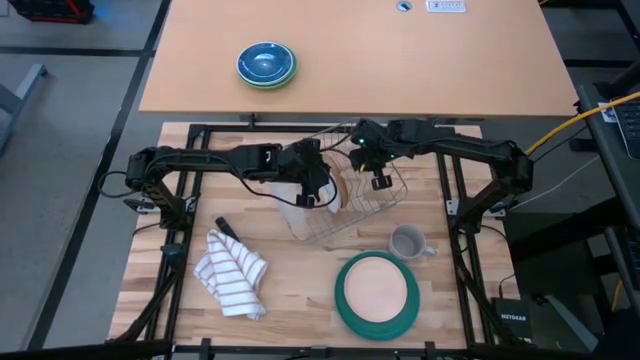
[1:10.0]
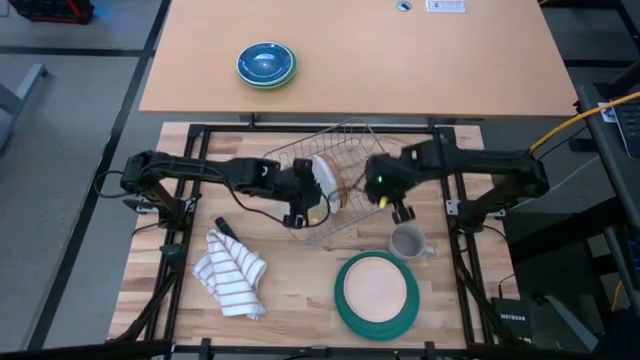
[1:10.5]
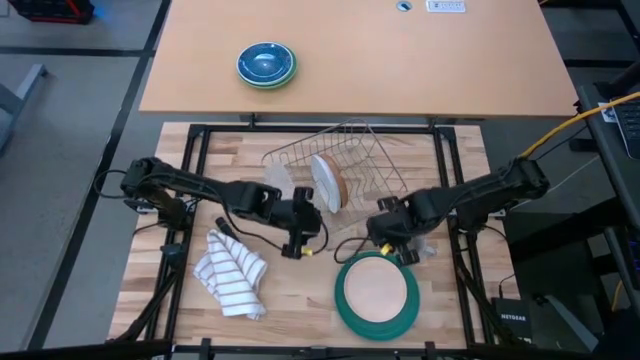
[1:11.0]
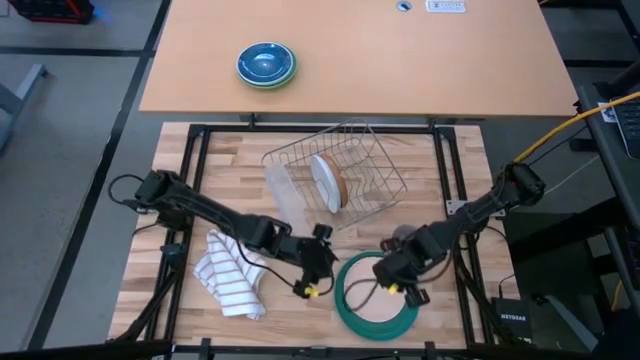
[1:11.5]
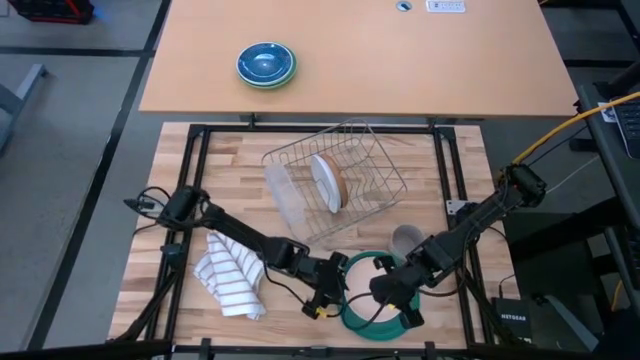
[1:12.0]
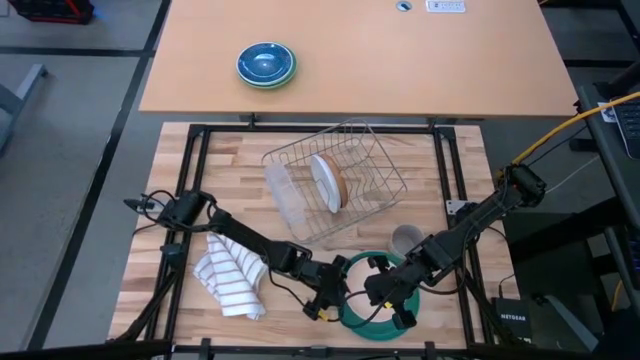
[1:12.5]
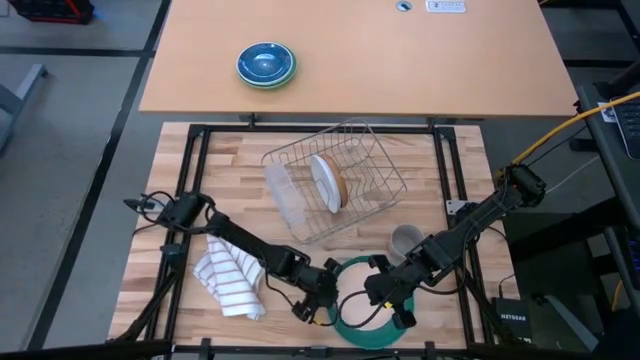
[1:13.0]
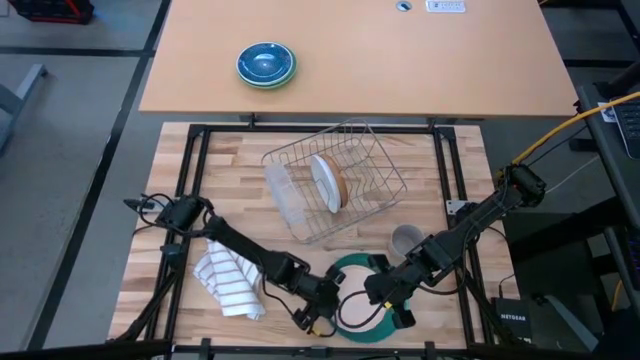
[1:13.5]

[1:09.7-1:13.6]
Task: Sort dishes
Adjust the stack of plates

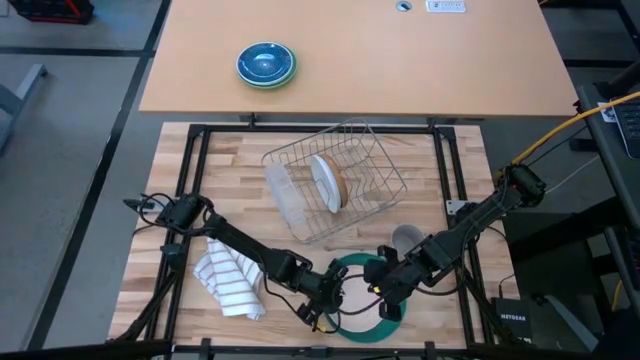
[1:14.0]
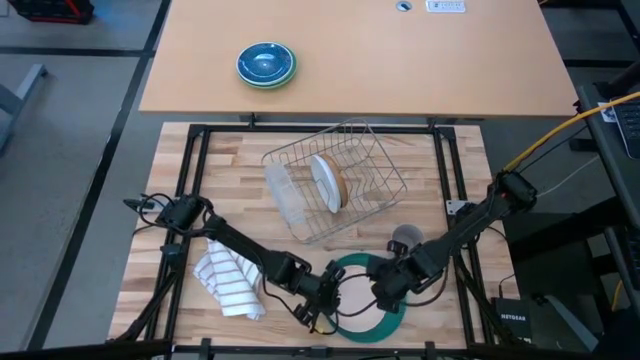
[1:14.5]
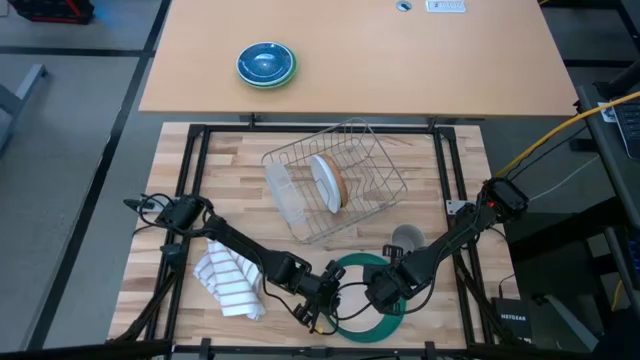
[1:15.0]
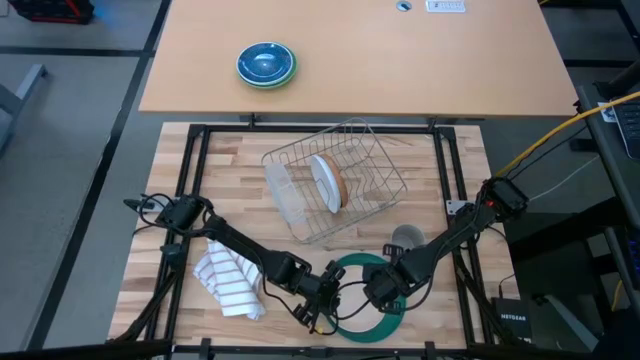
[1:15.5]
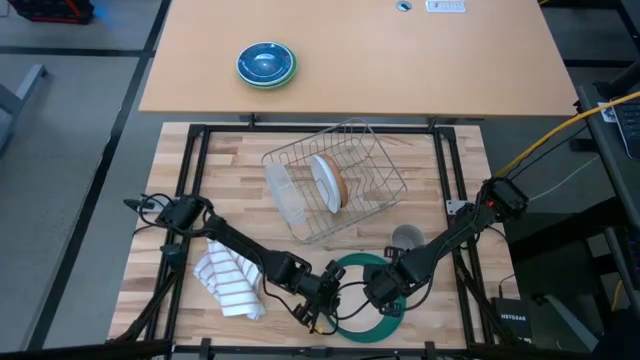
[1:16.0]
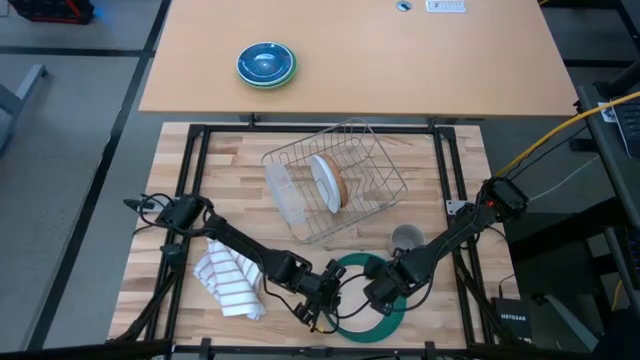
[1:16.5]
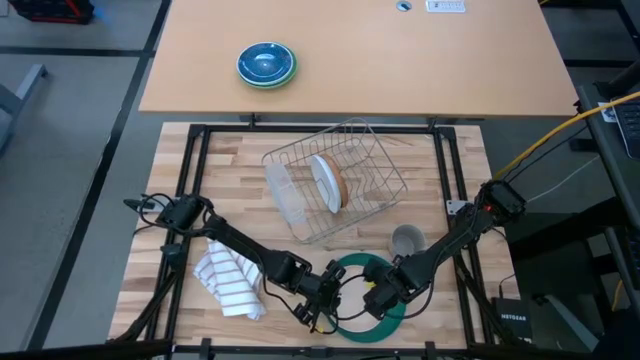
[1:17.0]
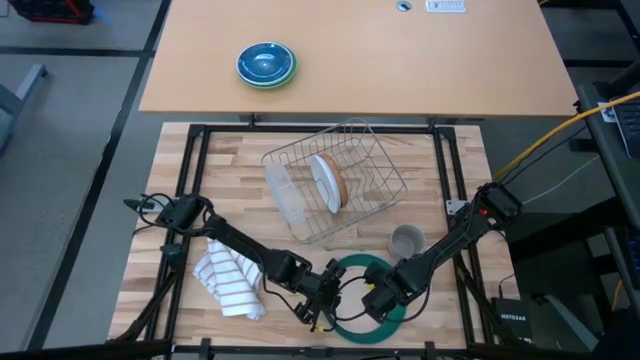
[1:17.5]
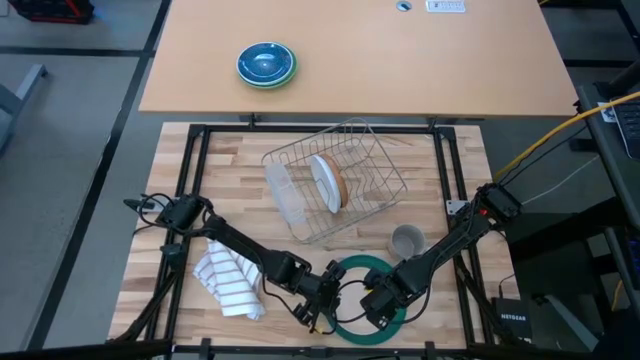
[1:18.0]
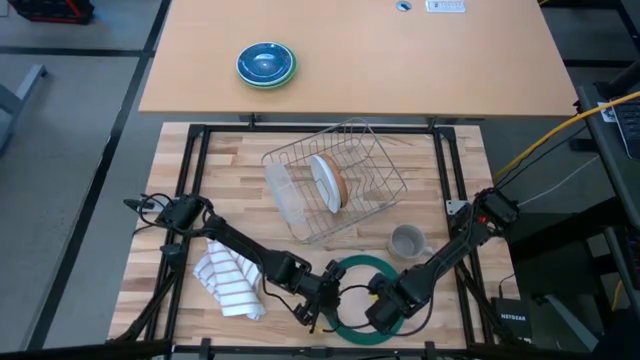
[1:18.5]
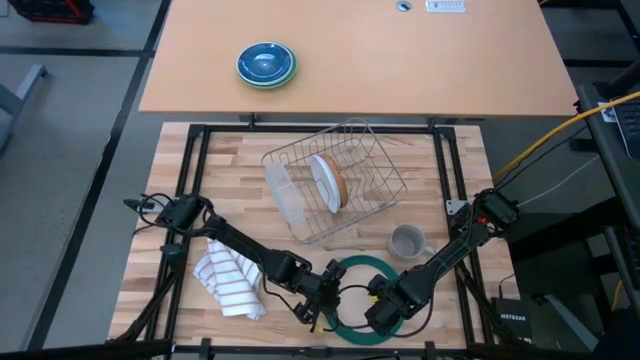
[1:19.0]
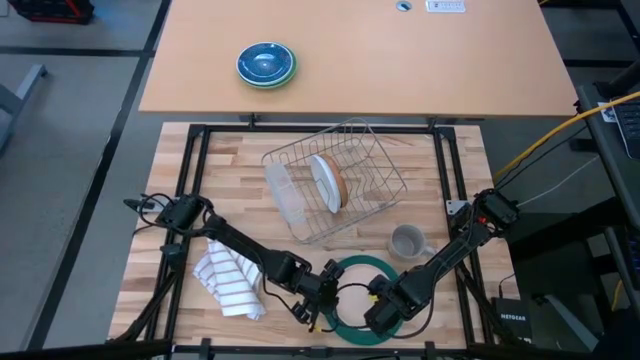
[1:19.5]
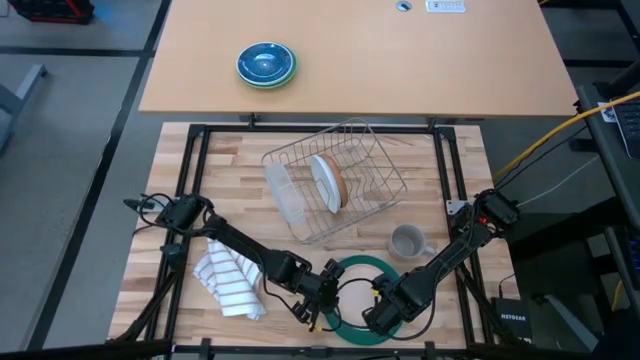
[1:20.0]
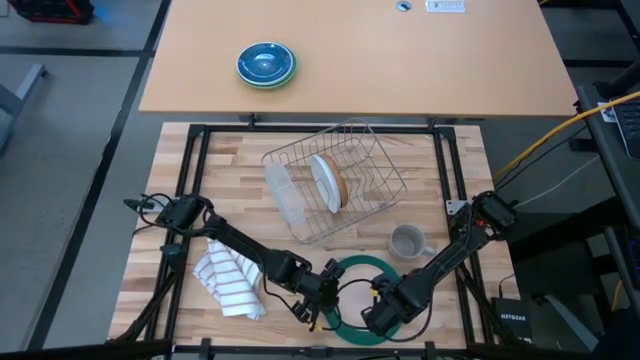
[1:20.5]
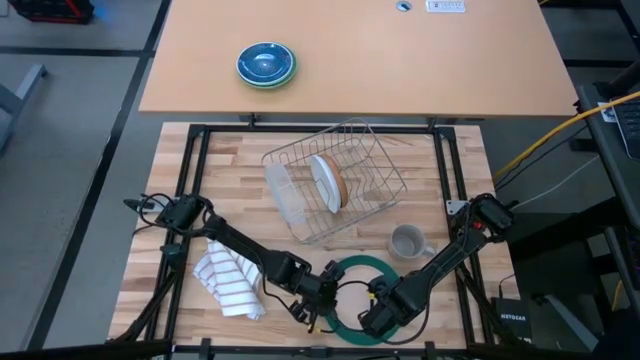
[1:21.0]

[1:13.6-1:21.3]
Put the pink plate in the dish rack

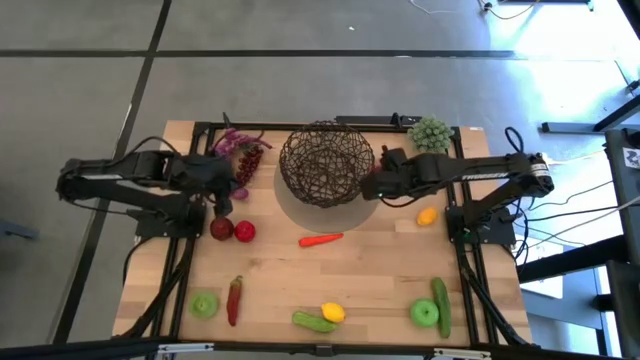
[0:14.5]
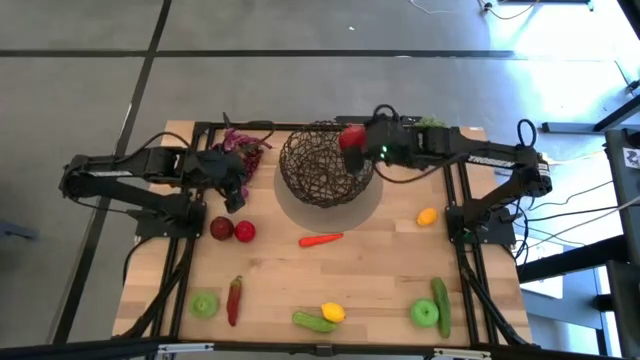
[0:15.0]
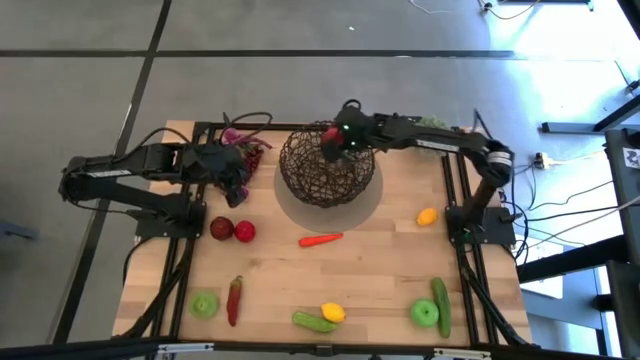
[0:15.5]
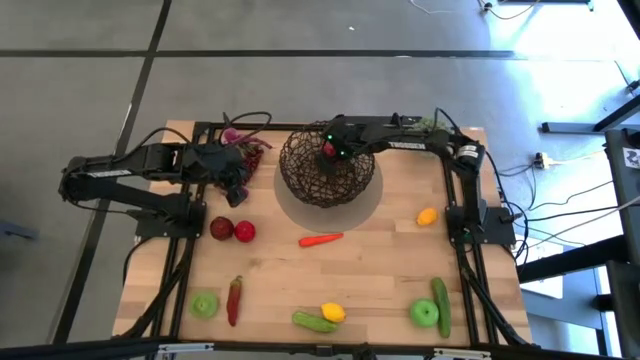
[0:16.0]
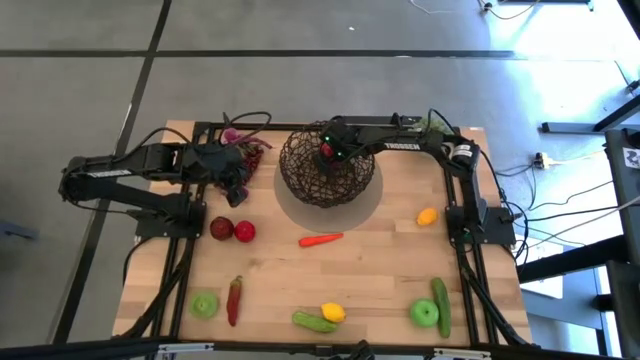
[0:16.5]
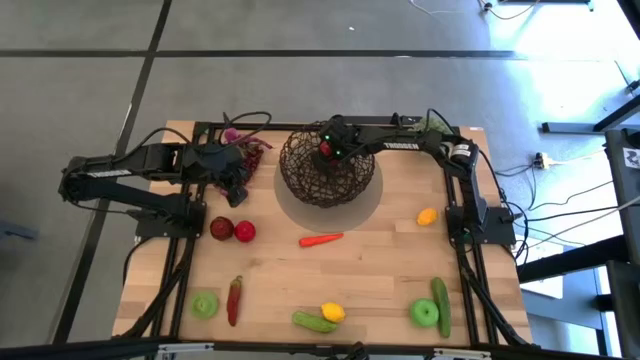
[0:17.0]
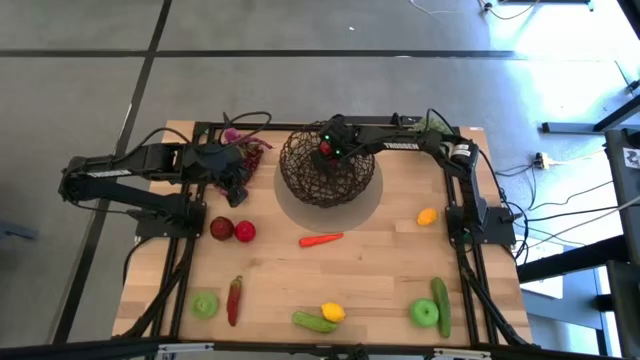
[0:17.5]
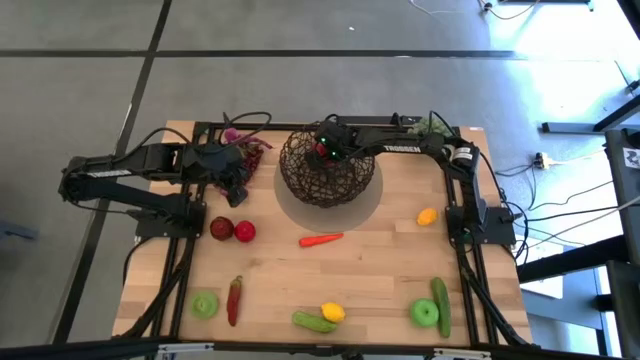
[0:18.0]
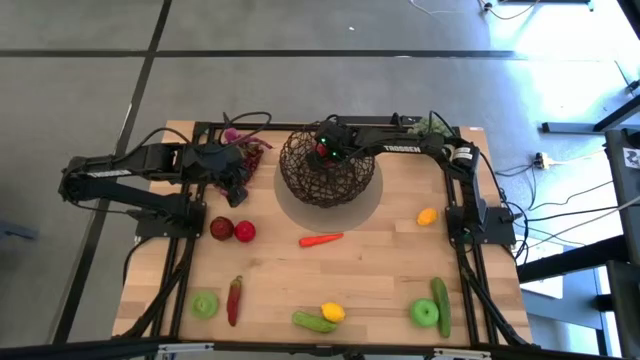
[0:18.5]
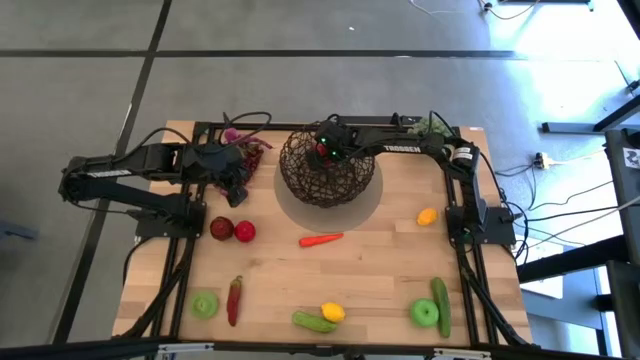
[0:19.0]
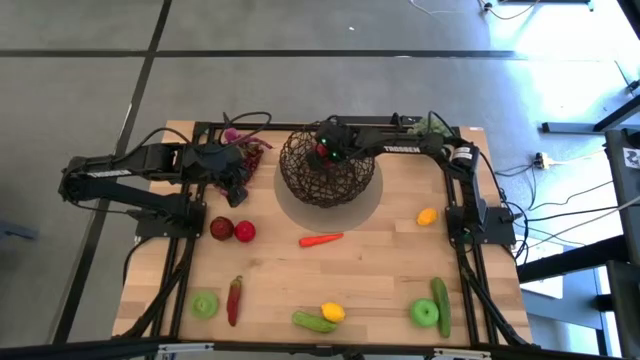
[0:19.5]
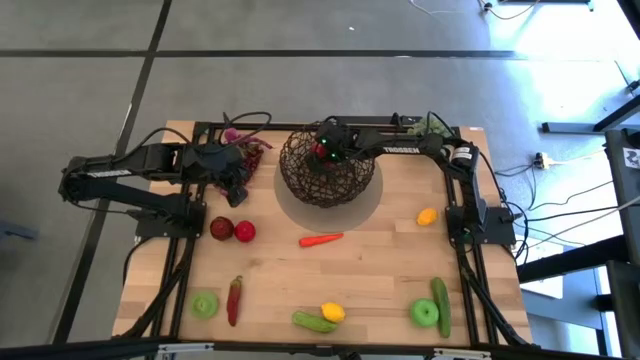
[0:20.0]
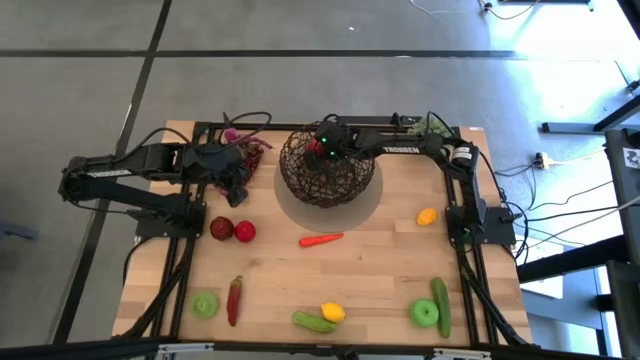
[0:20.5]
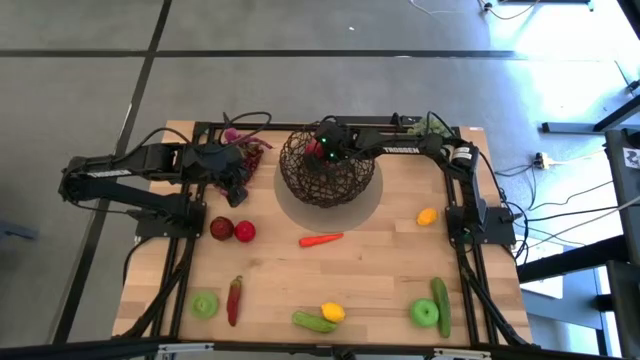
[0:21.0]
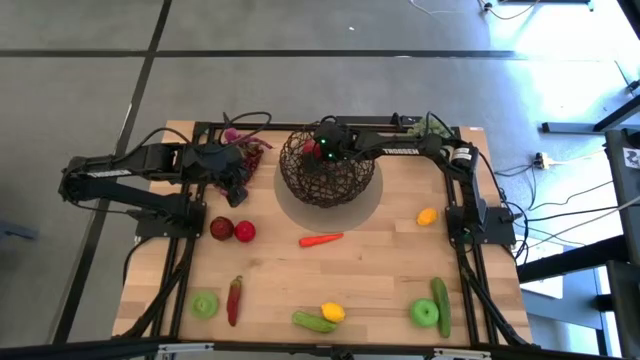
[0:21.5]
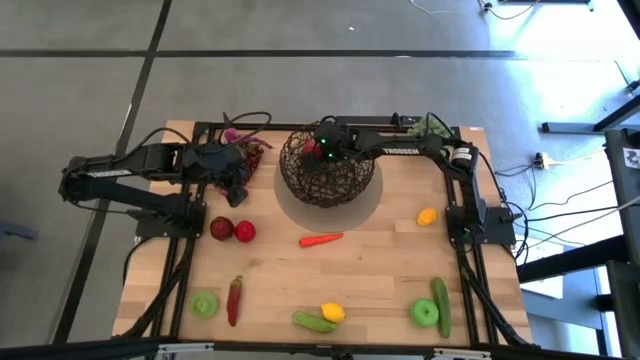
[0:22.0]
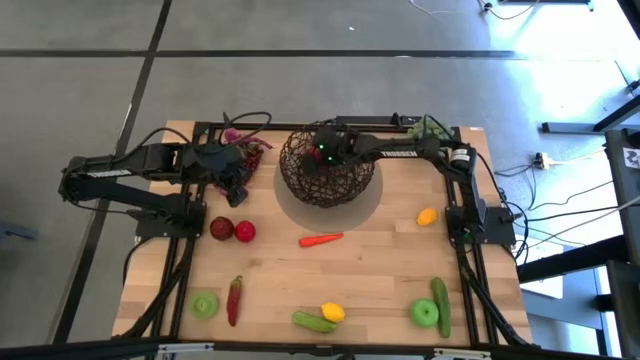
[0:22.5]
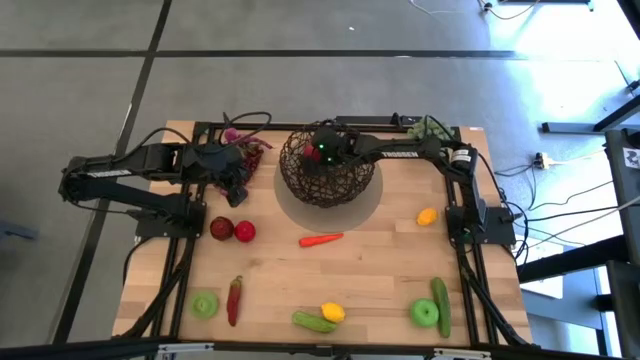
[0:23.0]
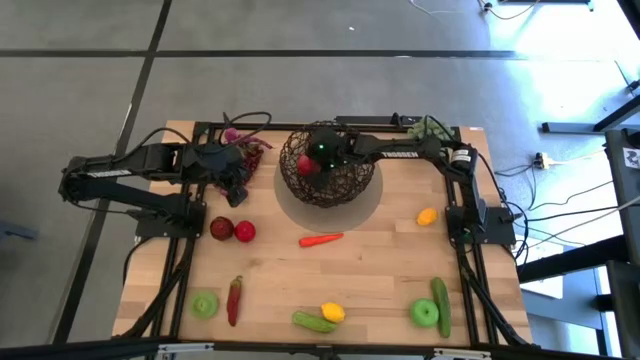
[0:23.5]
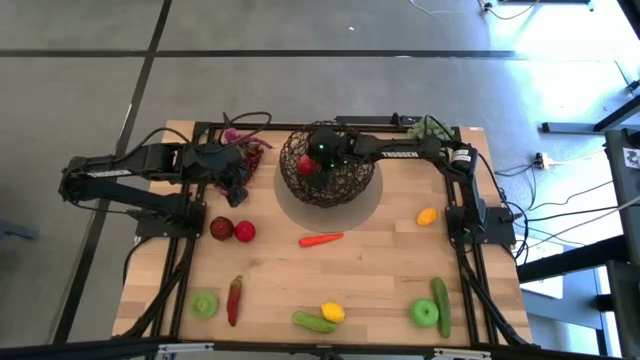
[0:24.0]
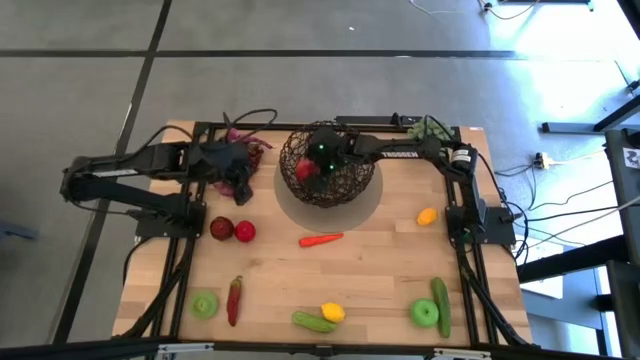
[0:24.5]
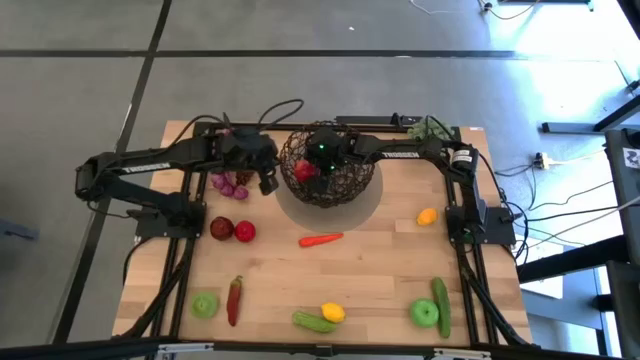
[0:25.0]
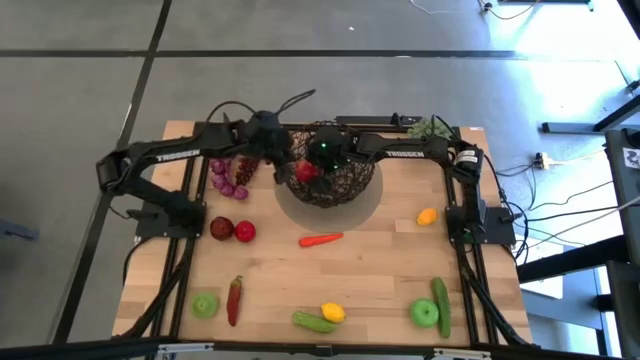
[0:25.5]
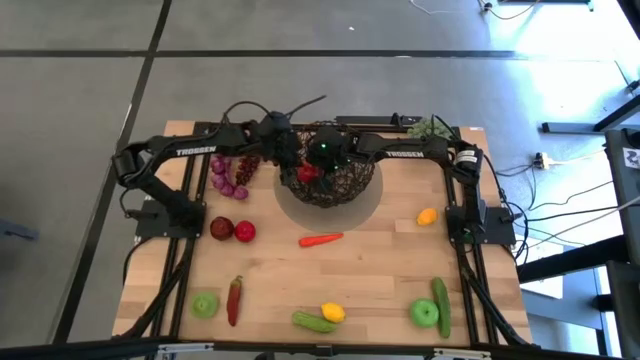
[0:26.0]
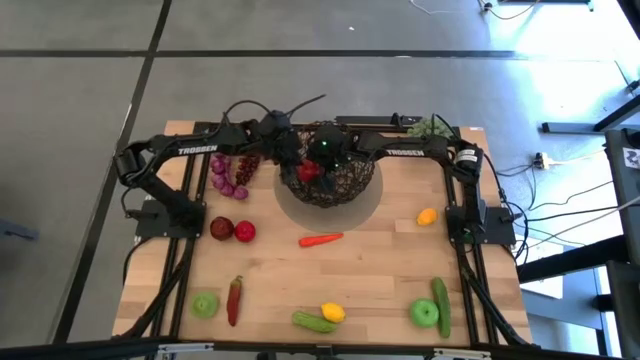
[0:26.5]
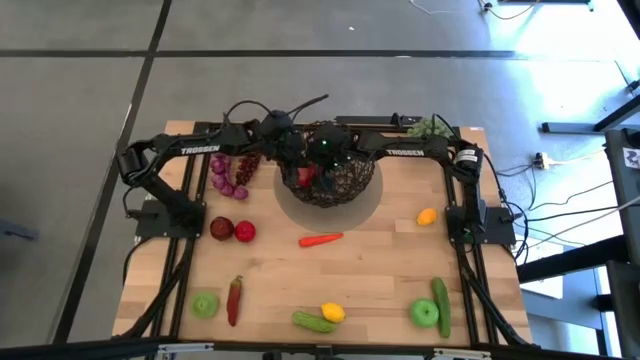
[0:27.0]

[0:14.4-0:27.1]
Task: Build produce basket
Put the pomegranate into the wire basket
